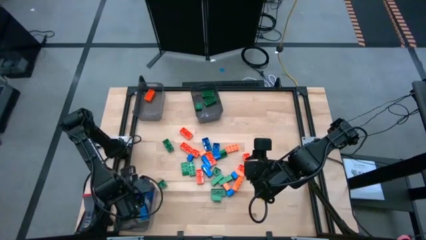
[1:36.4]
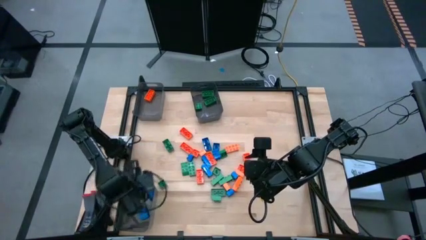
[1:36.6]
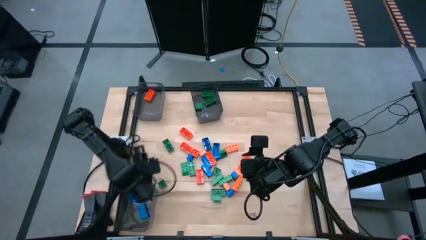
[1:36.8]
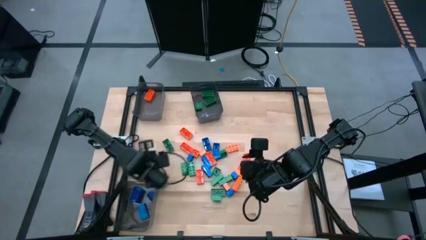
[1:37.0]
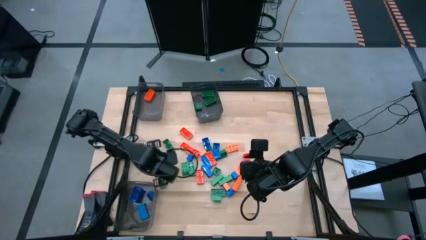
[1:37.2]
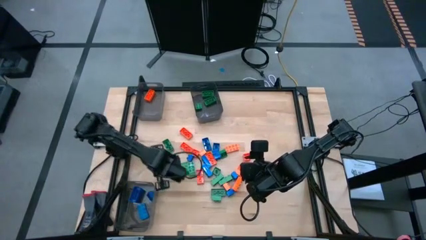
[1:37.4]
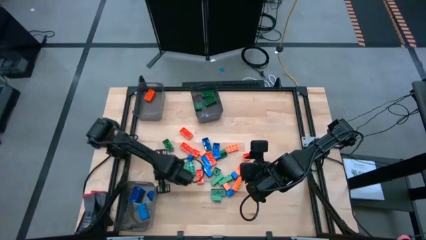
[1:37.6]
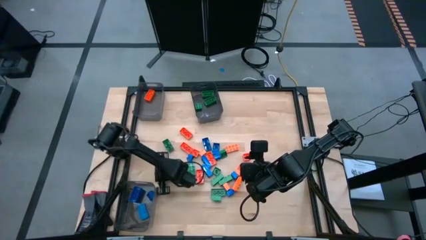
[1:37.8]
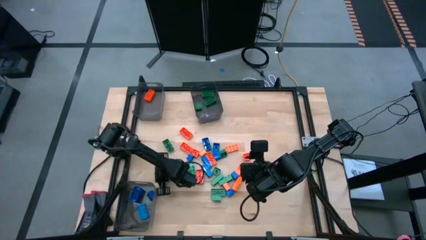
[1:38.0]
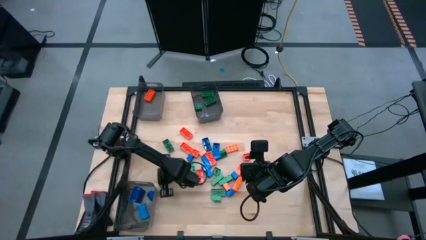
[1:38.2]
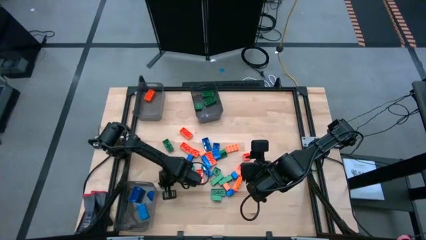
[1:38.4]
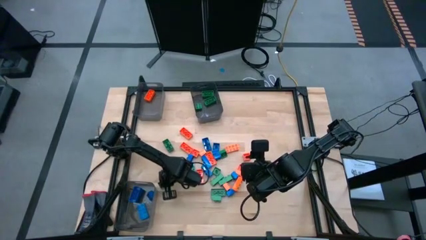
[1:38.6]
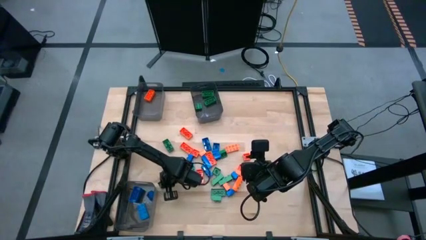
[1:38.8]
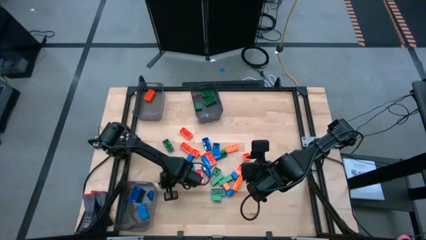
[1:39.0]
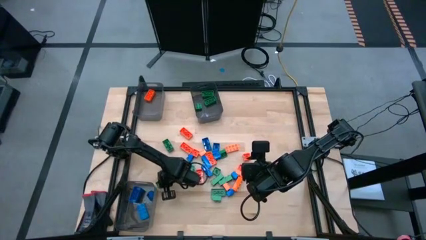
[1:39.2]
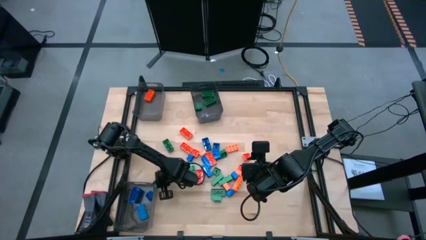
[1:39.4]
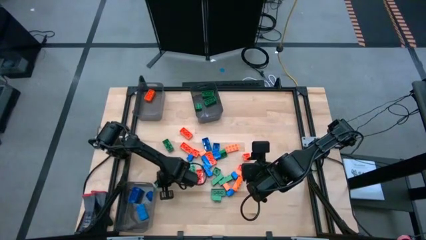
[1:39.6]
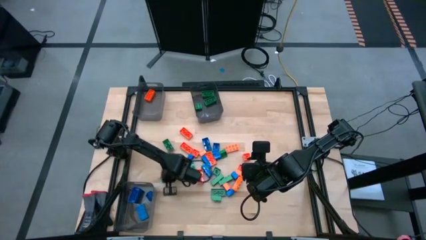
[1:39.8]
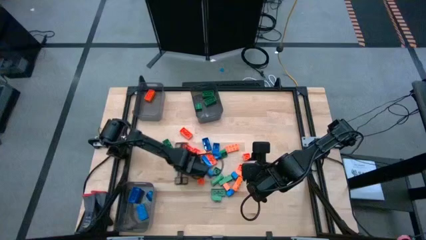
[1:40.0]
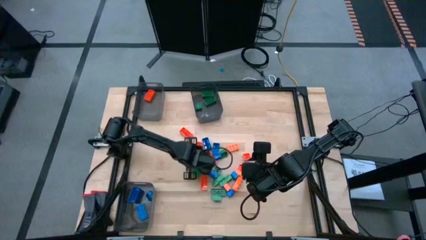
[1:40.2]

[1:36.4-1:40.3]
Task: Sort blocks
Move the green game piece to the center of the table

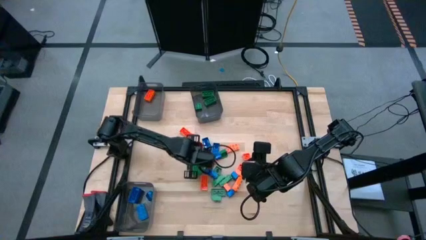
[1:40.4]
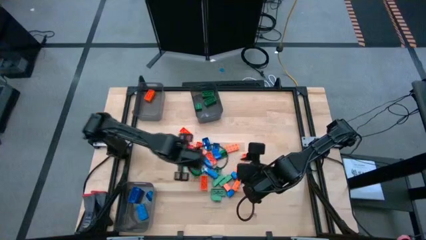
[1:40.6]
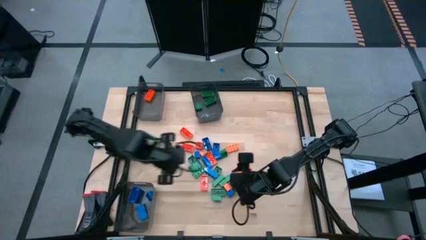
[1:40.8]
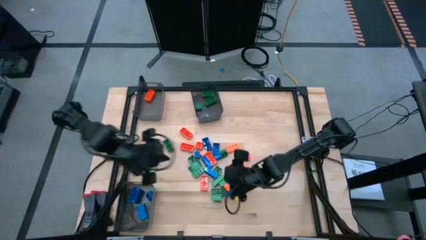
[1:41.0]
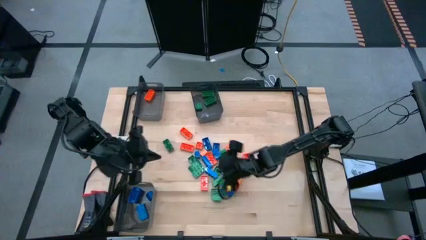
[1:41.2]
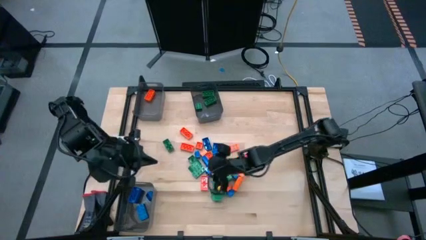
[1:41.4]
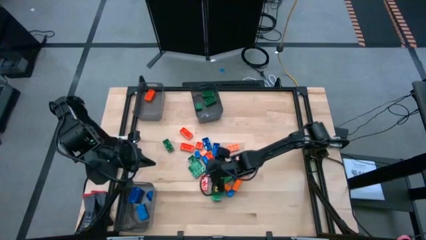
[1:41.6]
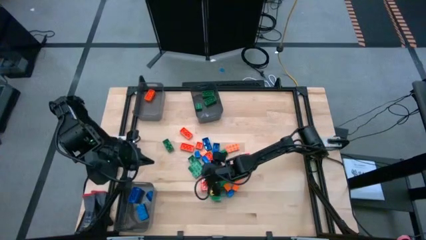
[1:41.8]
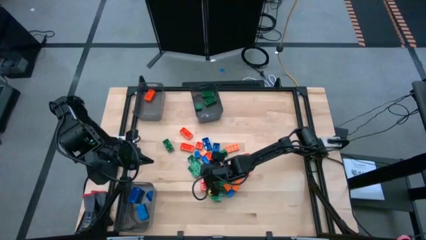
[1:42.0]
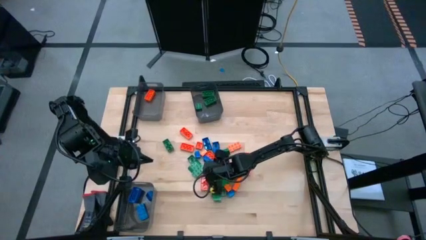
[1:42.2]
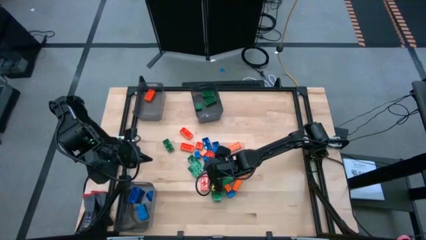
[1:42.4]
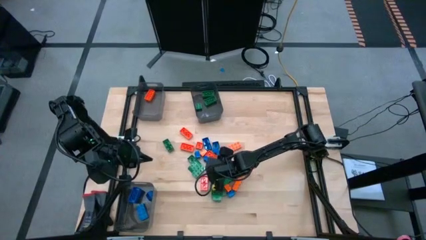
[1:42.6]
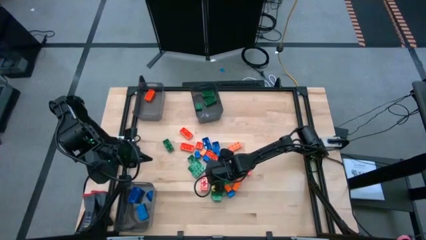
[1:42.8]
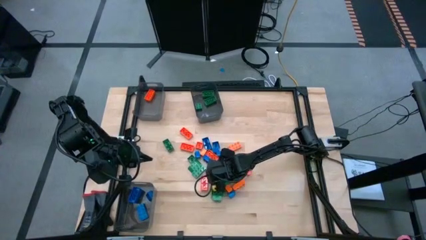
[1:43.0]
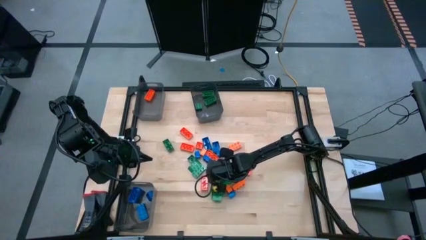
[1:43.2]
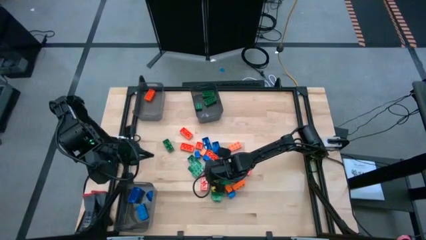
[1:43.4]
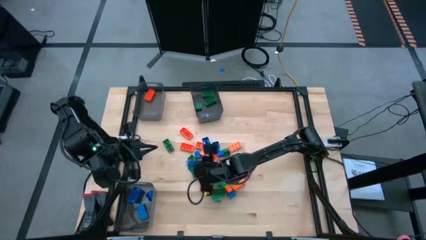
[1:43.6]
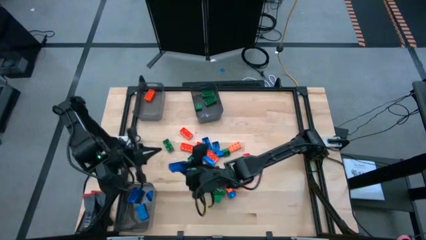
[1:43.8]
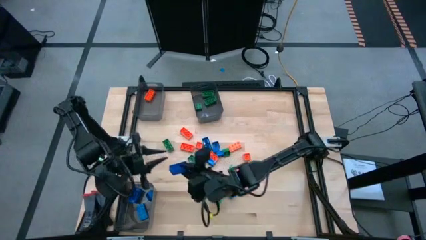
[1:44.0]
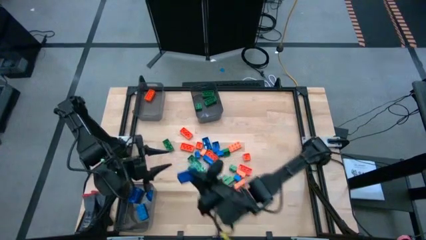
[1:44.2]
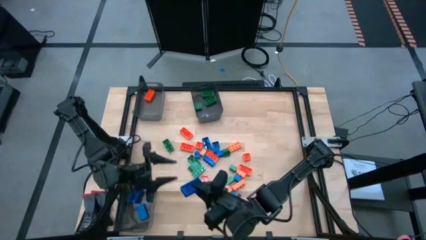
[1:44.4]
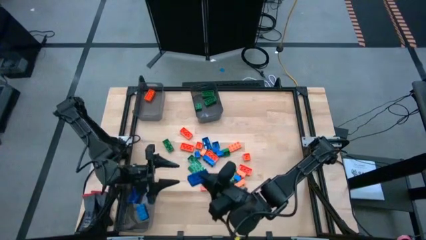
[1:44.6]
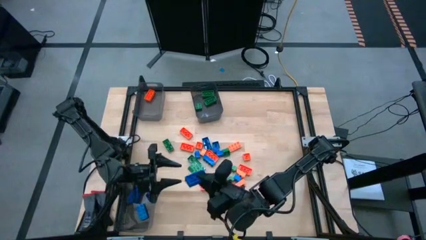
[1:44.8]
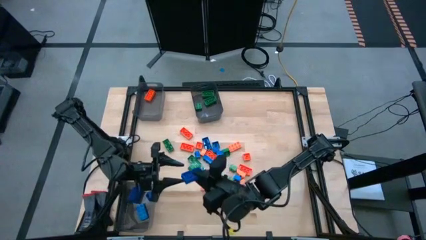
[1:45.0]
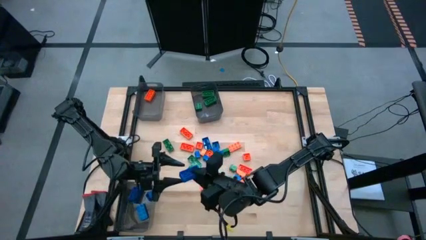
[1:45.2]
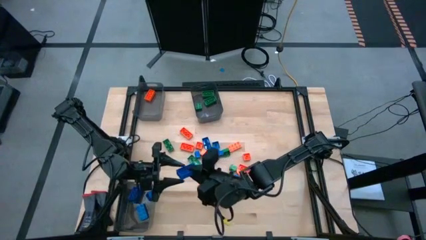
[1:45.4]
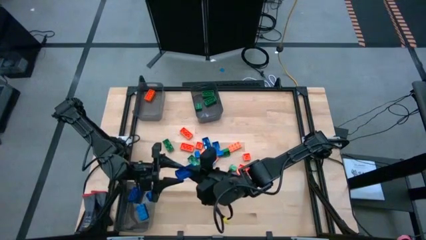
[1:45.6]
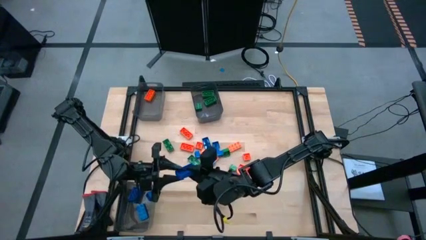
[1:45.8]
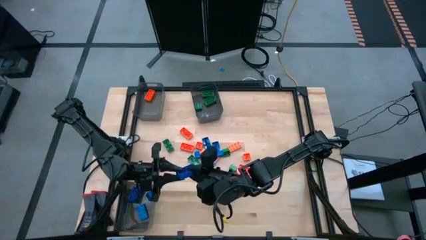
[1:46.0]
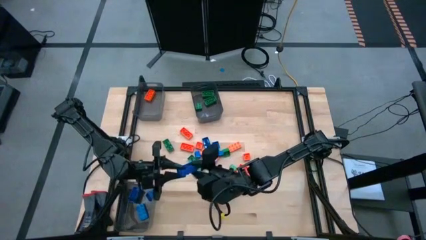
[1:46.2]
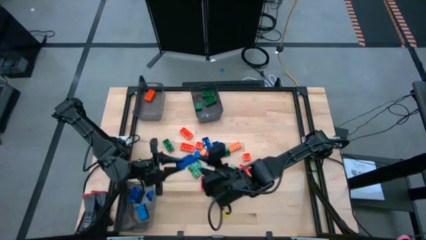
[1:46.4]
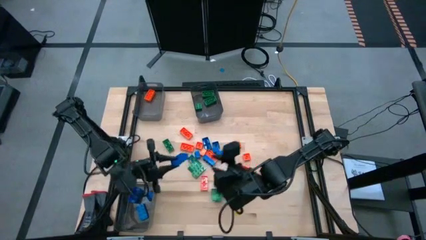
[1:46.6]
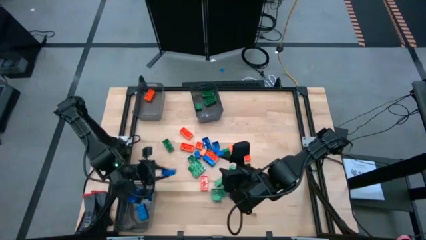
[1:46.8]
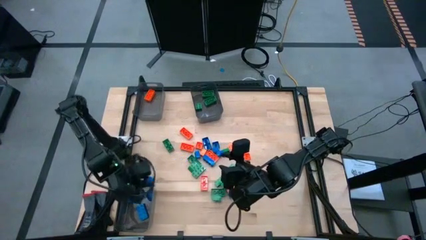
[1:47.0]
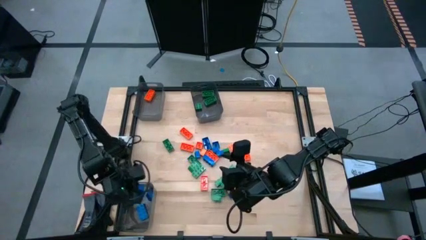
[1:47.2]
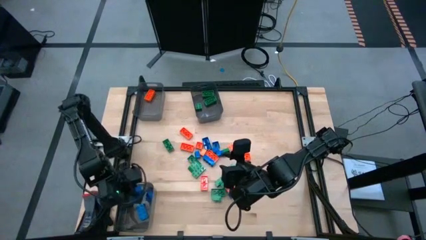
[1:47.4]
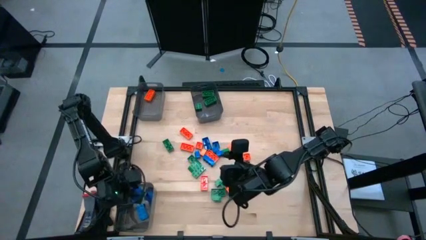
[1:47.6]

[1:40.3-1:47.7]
Put the blue game piece into the bottom left black transparent bin

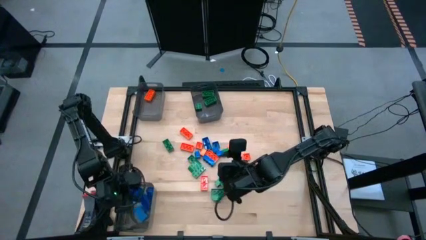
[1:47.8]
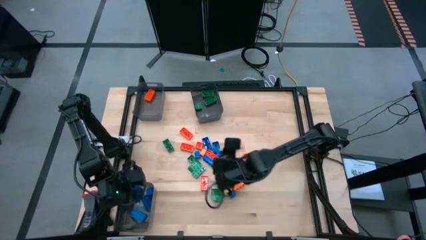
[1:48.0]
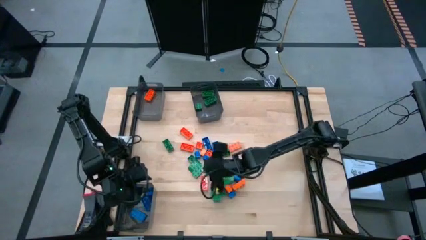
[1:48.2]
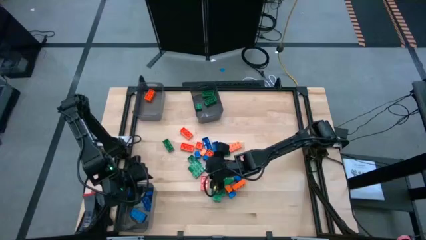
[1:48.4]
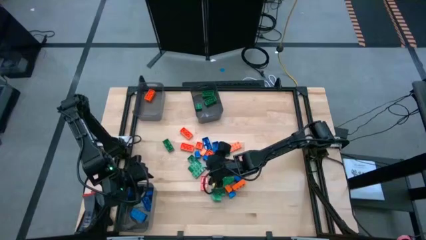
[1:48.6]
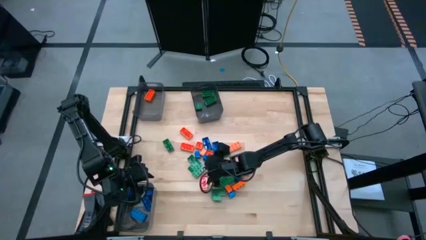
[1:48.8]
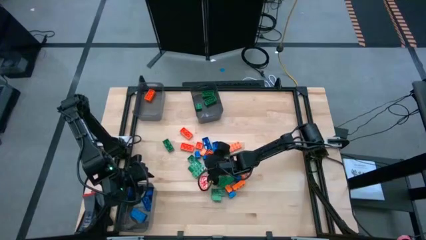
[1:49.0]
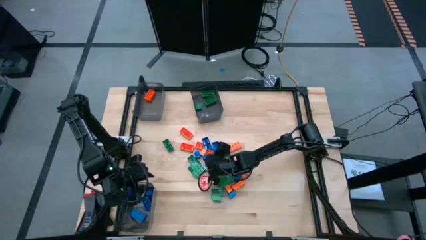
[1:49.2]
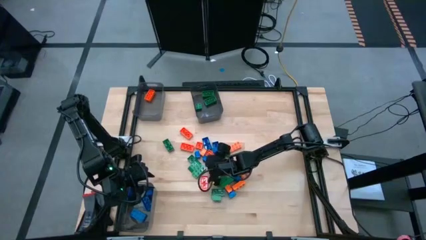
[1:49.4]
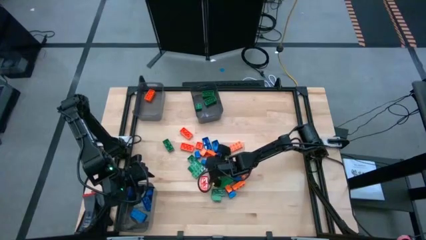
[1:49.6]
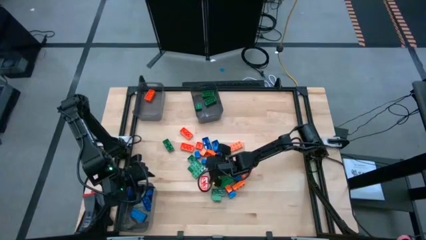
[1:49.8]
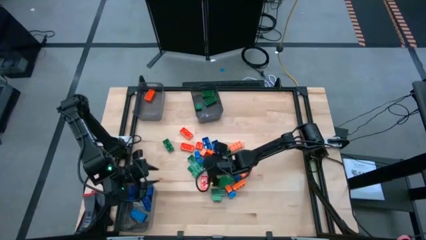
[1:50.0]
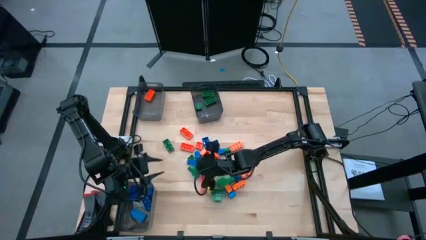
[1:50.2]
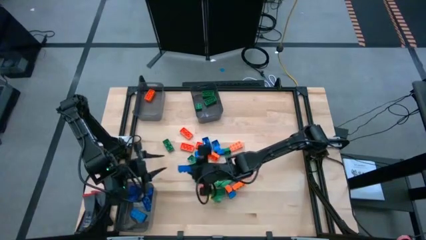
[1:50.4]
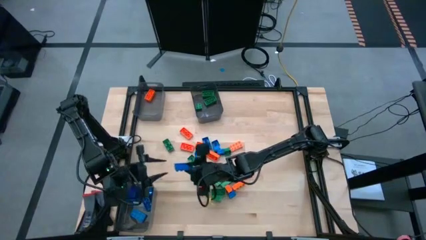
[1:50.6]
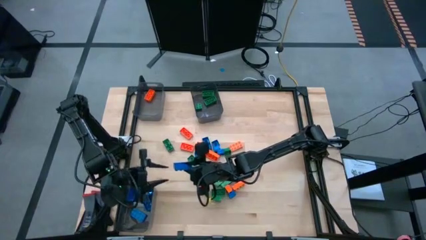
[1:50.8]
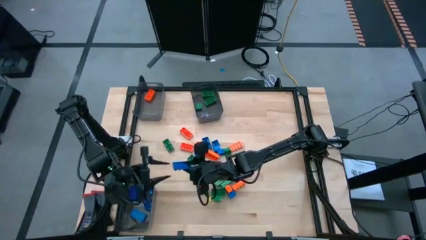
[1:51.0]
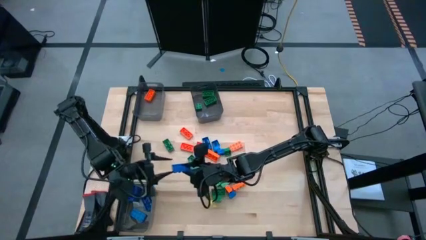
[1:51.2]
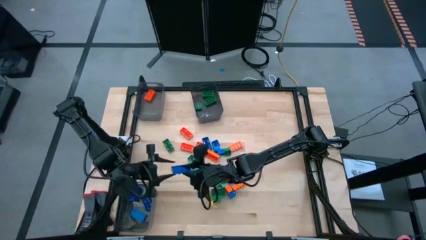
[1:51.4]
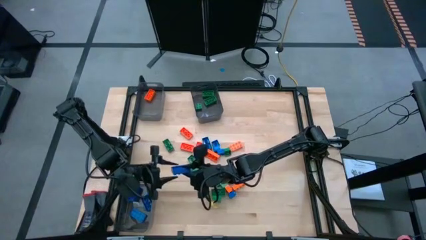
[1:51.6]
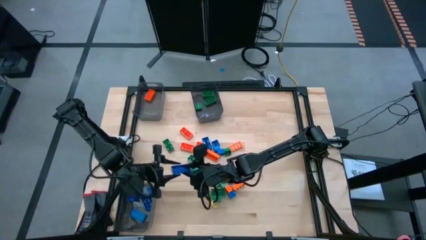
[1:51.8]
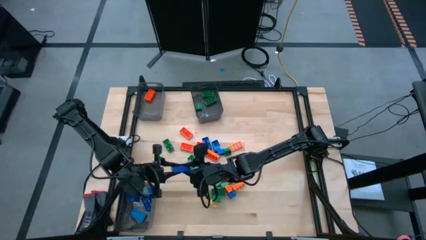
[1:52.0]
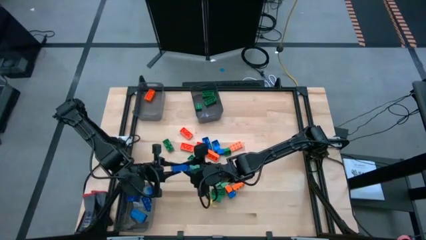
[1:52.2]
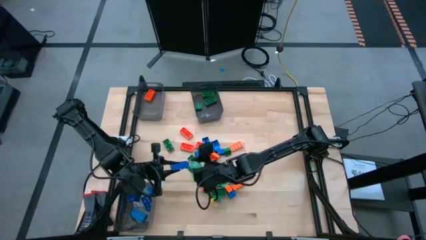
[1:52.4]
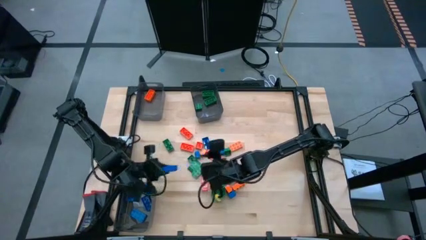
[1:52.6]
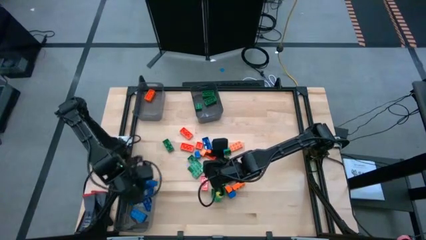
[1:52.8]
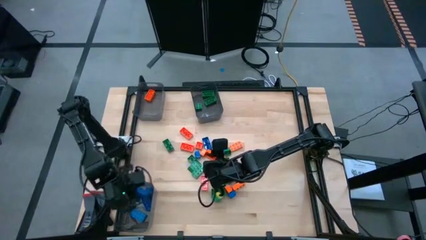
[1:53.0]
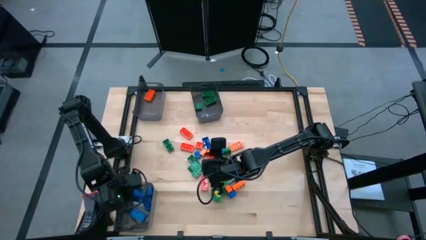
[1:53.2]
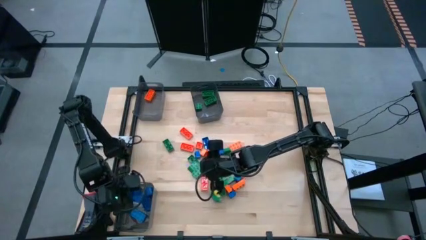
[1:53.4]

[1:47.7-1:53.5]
Put the blue game piece into the bottom left black transparent bin
